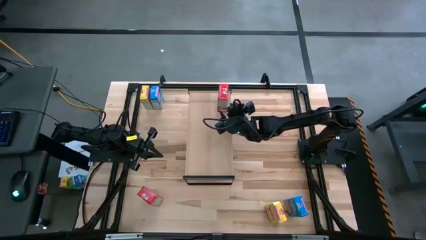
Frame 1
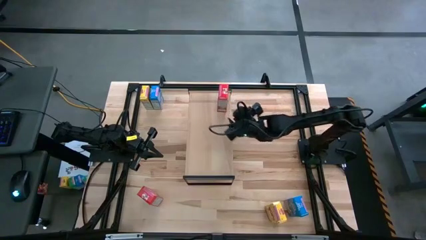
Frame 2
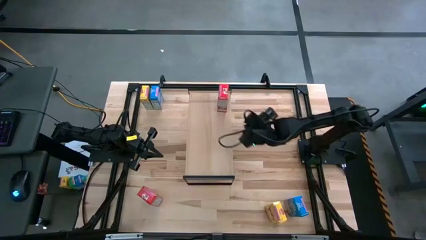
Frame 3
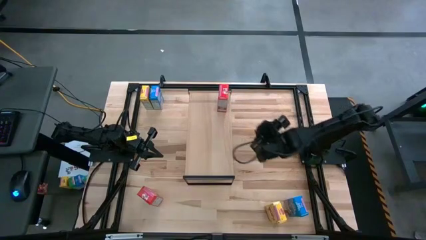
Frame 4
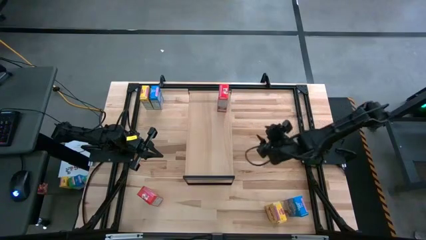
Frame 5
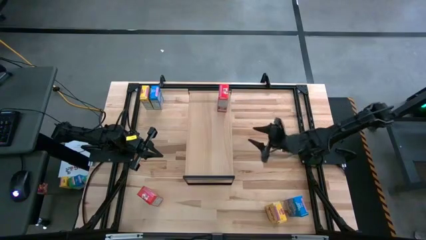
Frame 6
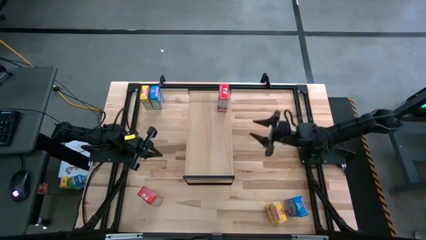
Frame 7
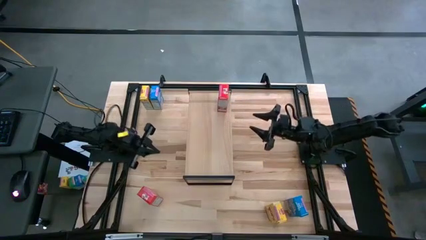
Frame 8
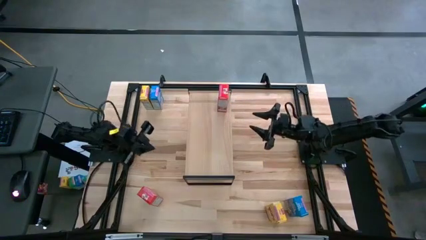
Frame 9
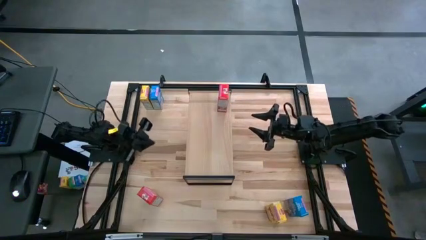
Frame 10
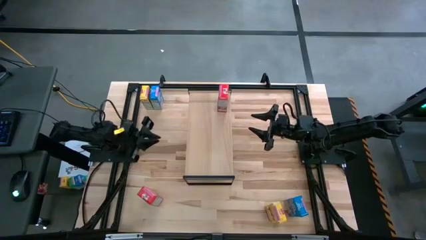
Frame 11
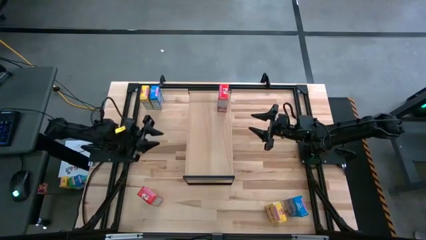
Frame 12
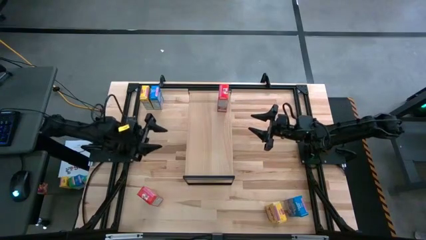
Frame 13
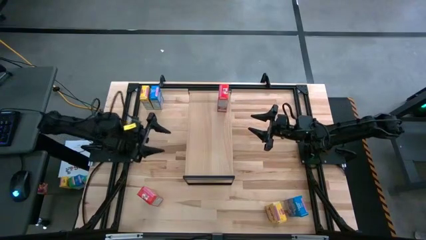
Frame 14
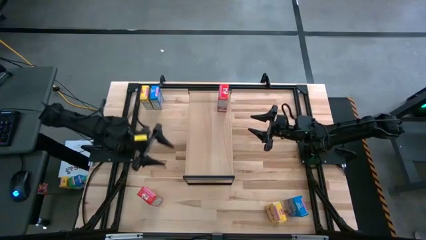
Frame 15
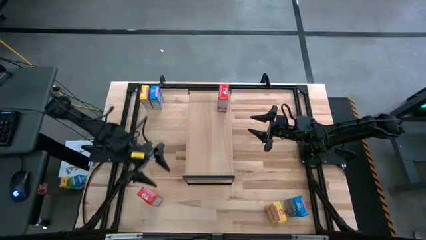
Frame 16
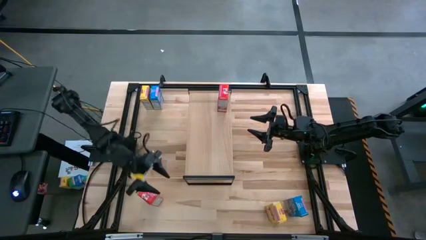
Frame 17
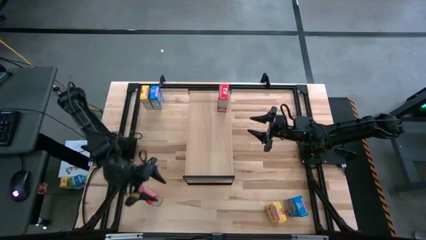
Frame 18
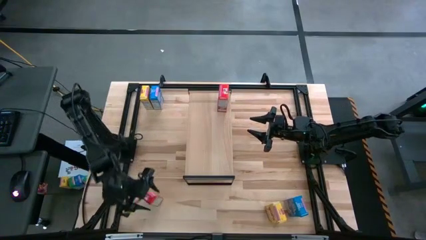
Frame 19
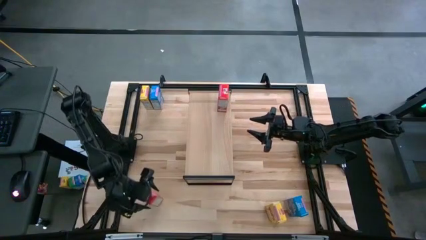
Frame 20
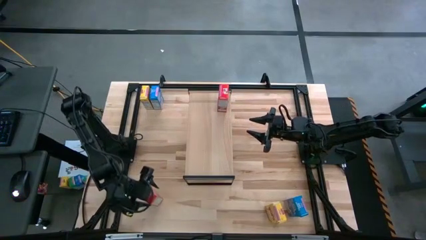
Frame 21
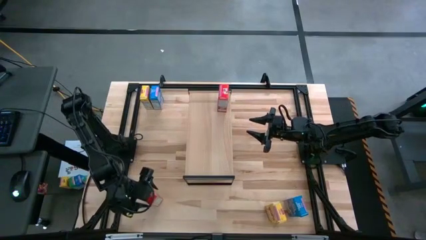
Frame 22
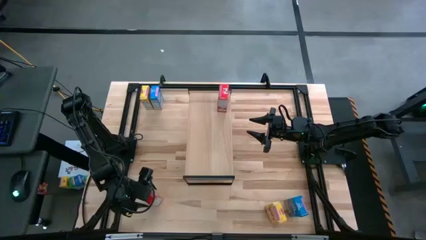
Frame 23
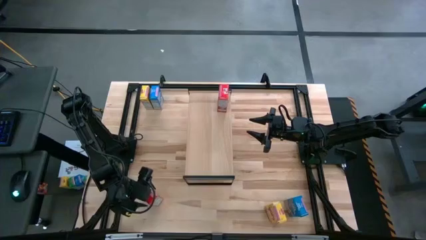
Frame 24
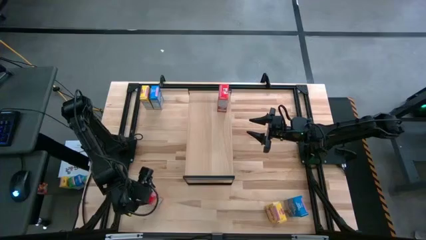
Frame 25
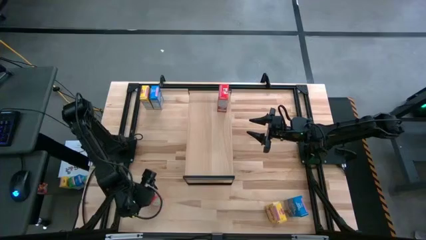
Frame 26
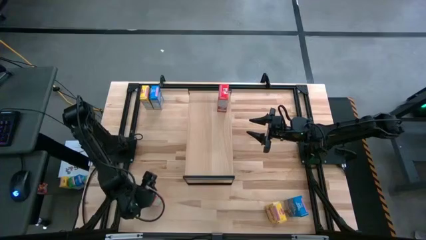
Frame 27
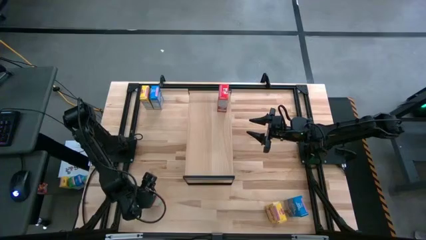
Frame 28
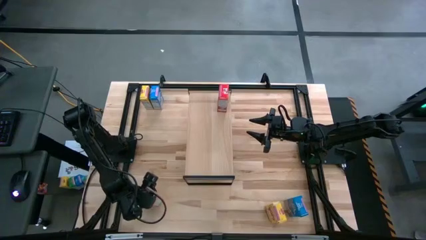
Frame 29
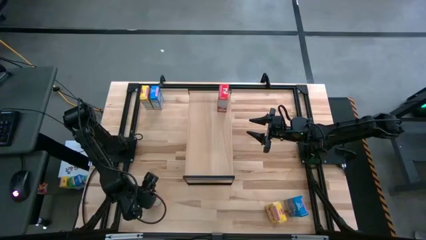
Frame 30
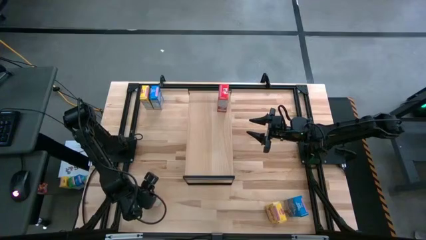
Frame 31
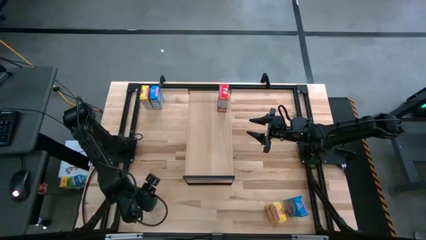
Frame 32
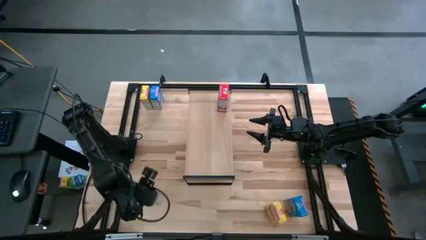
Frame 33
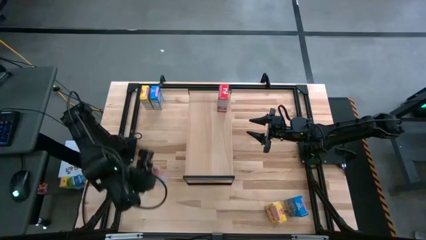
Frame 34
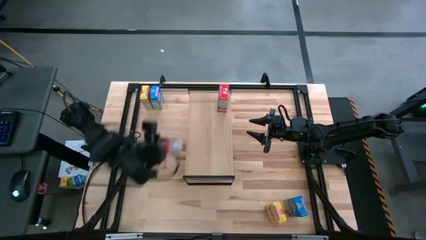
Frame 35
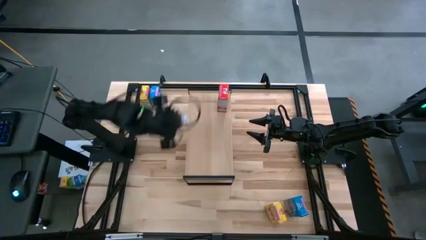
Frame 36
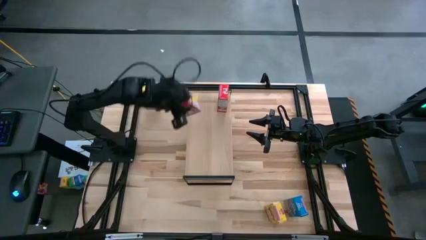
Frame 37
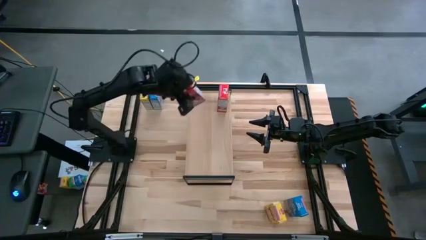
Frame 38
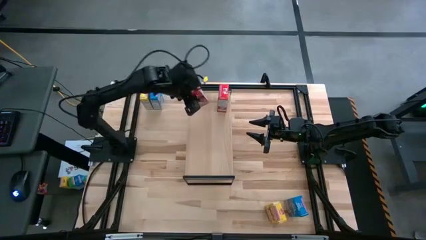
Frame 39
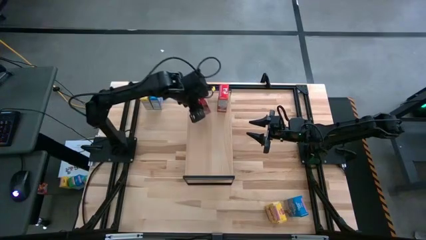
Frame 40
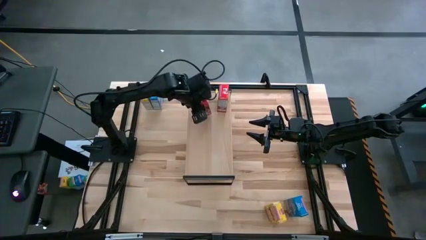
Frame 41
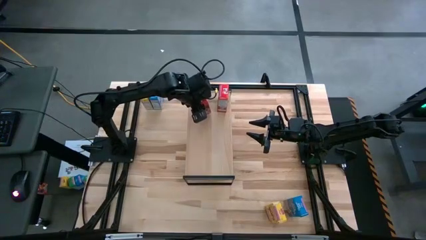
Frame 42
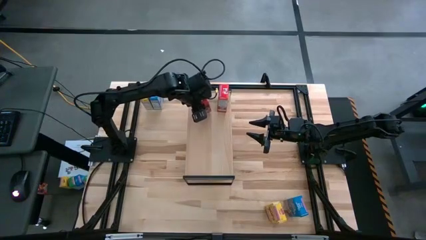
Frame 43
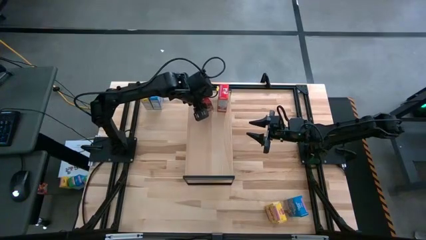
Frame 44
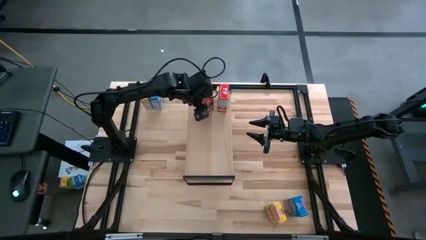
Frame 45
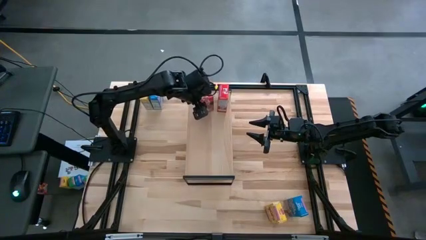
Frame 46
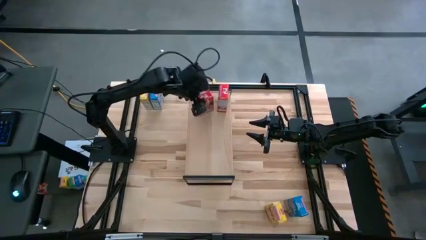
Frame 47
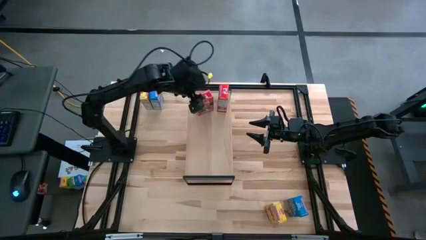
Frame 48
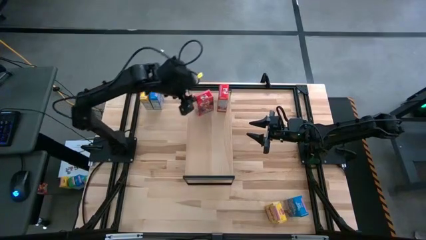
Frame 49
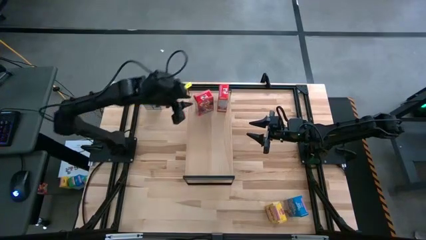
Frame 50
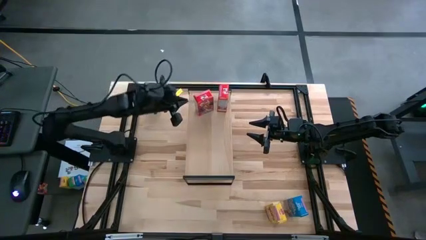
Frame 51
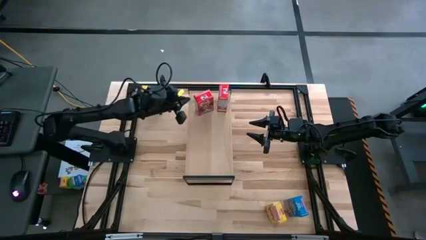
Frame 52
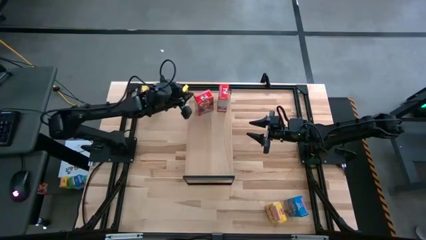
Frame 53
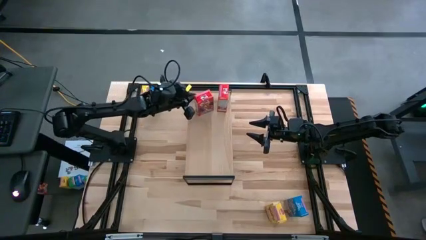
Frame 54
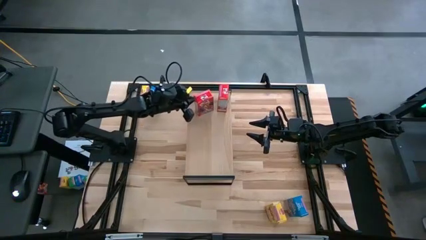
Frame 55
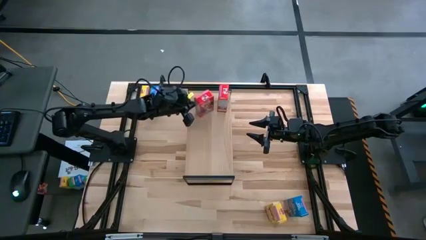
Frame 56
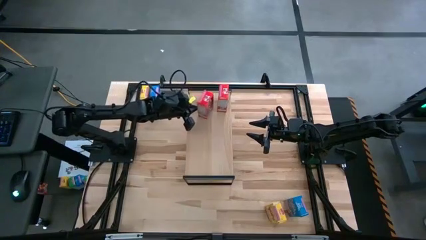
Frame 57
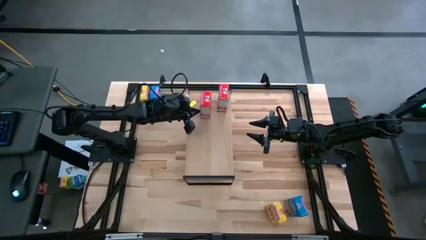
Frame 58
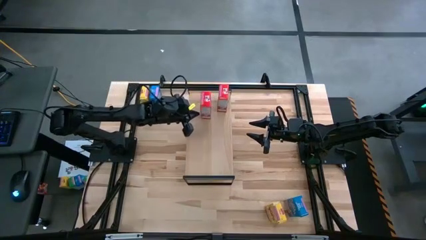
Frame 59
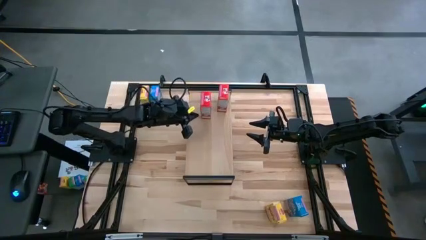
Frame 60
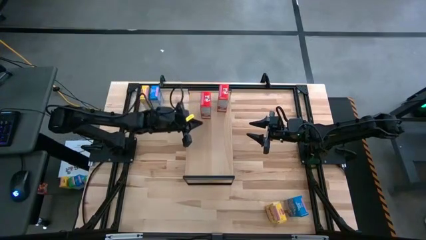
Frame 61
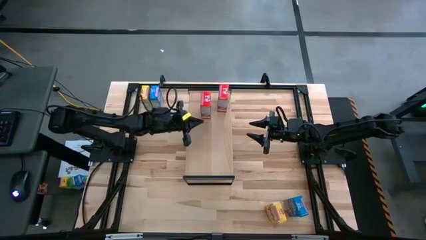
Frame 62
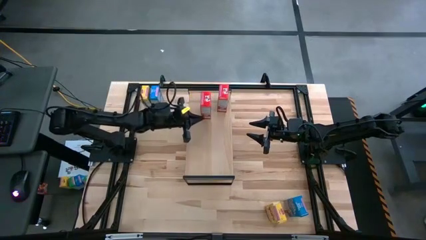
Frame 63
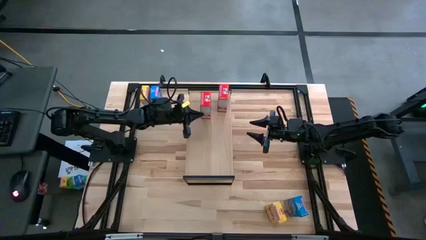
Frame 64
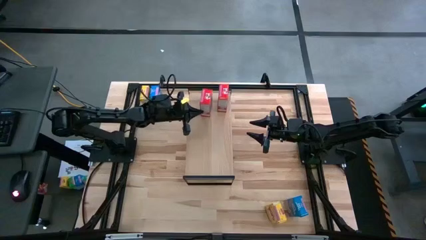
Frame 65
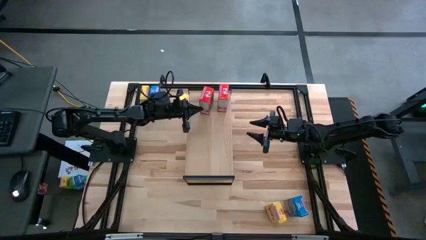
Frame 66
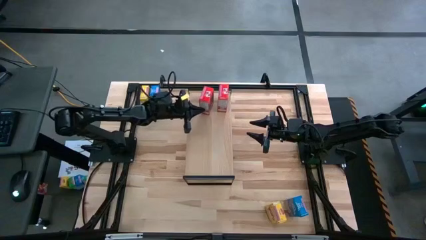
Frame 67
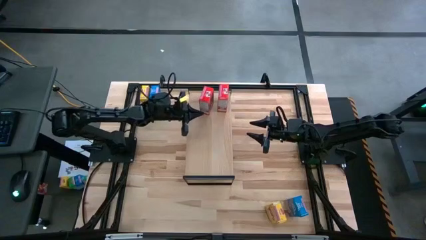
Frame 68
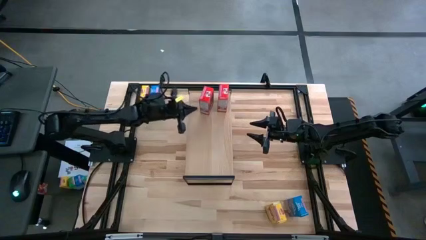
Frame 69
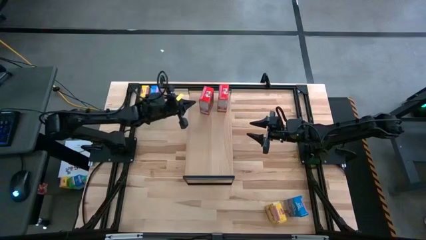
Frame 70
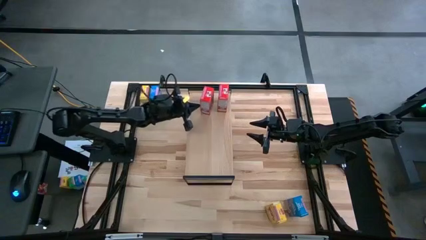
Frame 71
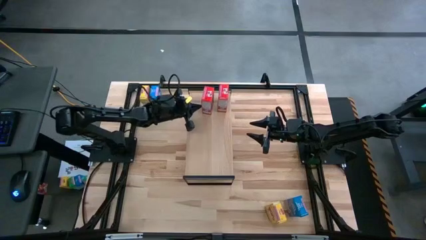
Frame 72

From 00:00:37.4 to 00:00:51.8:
Task: Stack cereal on shelf
Put the red cereal box on the shelf aligned with the other red cereal box
